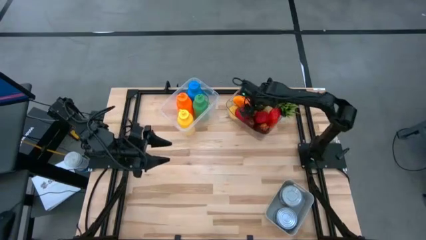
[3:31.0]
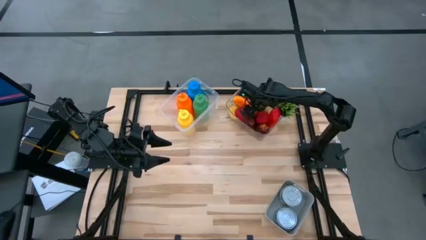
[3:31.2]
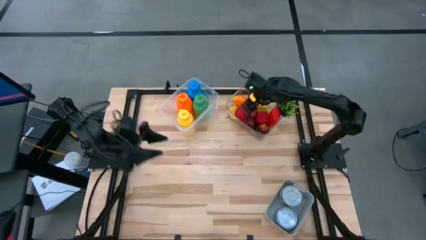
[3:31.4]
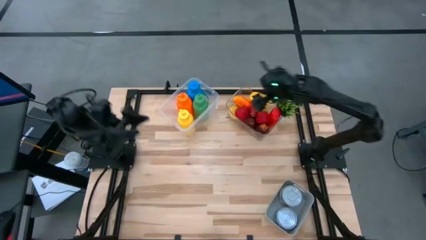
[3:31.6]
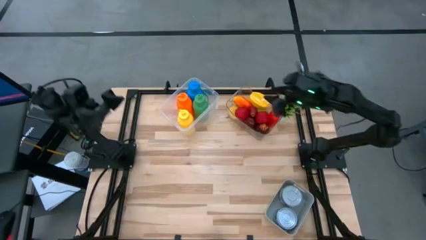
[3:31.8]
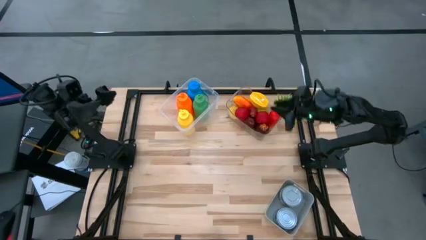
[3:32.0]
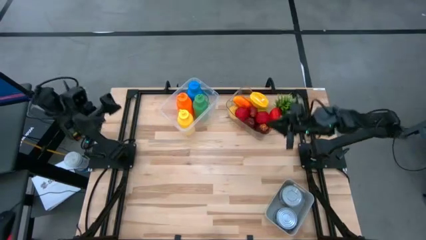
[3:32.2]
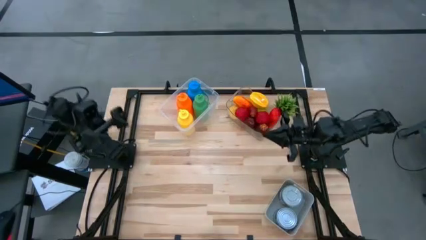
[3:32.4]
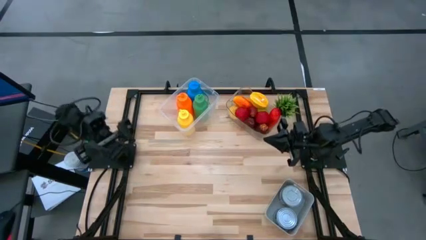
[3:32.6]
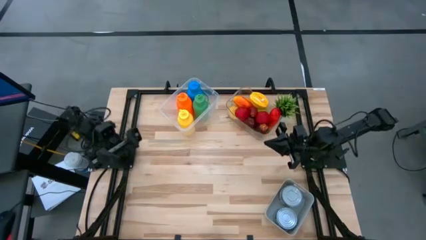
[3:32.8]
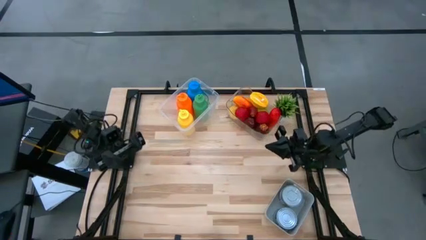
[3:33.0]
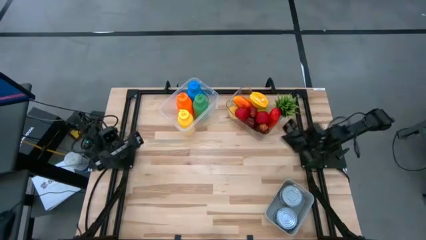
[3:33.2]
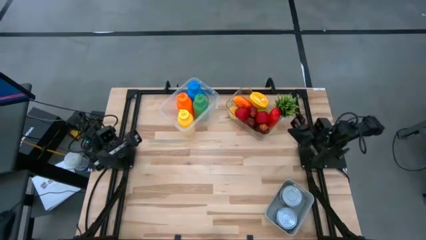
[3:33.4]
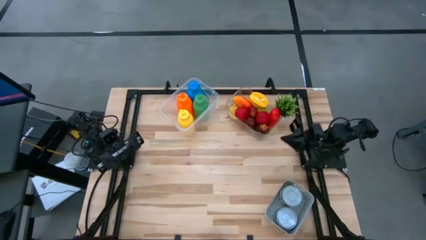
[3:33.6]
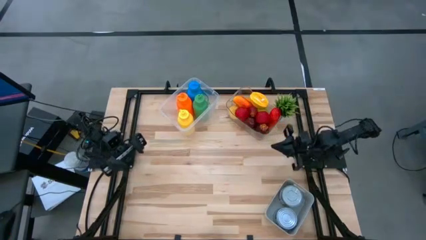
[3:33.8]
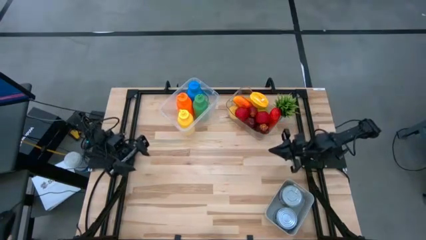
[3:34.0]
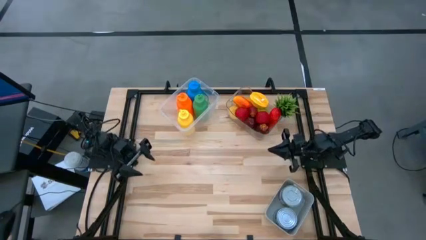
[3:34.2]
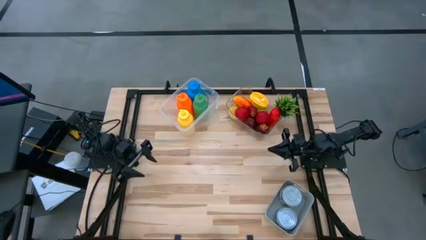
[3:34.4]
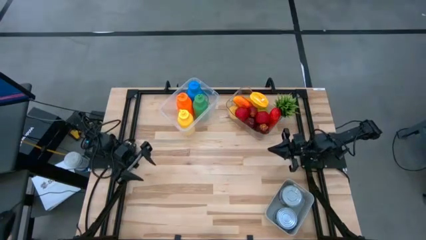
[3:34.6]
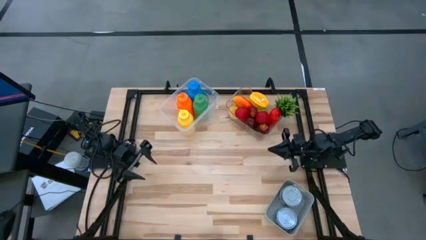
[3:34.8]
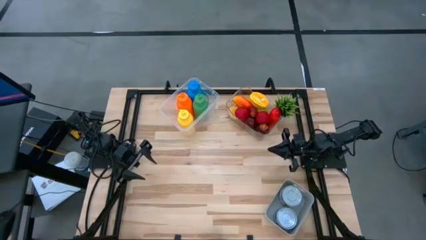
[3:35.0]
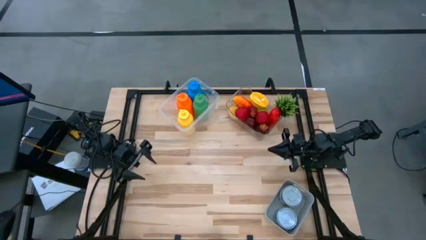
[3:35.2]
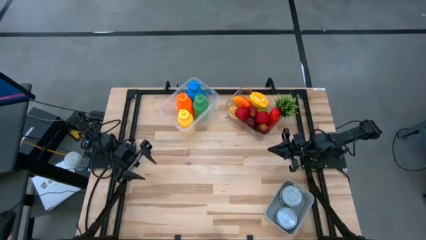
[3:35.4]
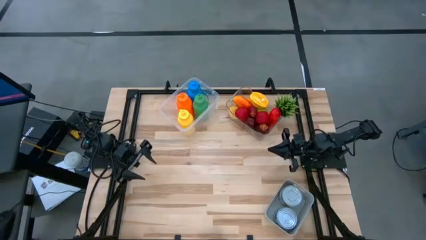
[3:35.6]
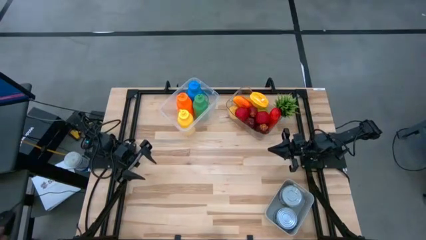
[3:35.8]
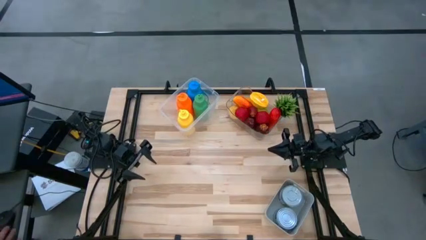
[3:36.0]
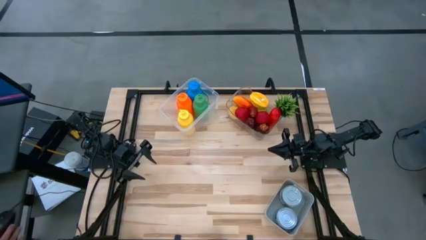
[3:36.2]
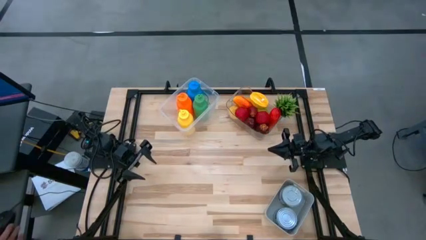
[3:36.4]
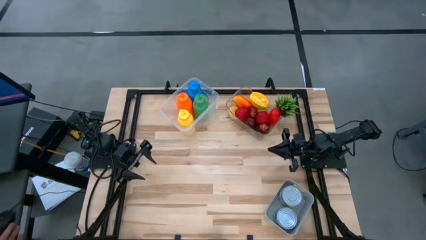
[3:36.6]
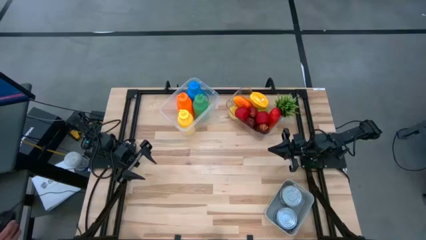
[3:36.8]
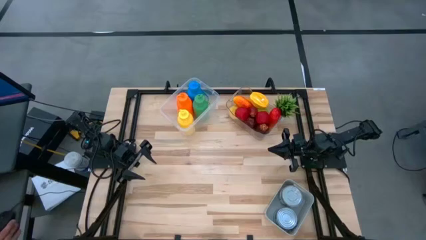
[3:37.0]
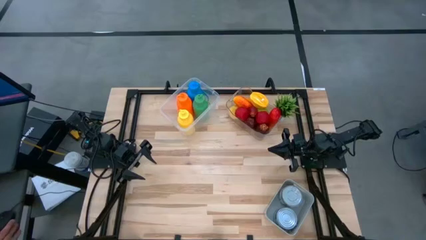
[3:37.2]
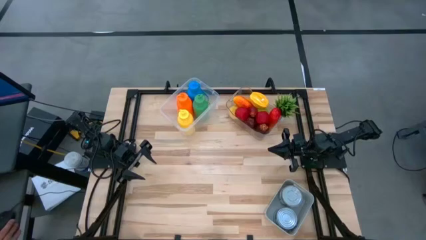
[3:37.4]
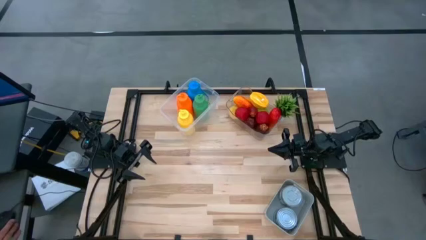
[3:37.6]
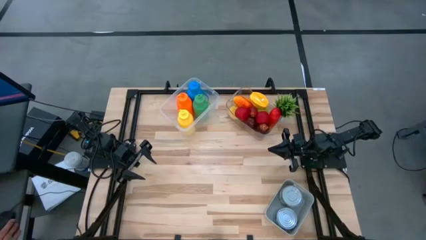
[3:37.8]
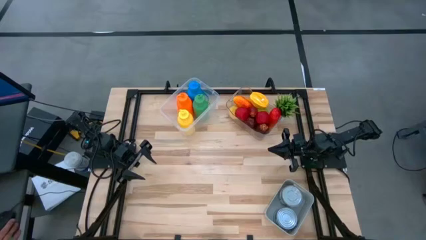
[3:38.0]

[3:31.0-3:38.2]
Task: Pick & Place Food Item
Return to Home Position

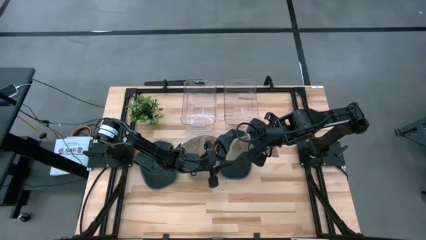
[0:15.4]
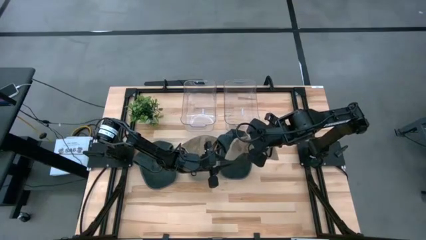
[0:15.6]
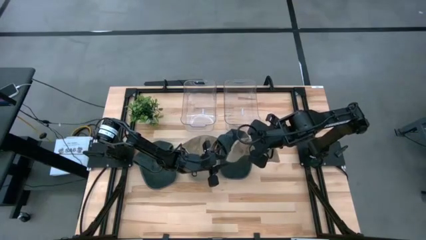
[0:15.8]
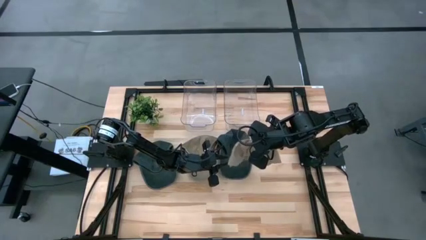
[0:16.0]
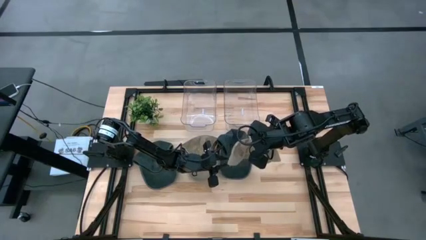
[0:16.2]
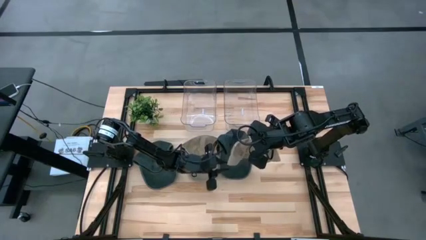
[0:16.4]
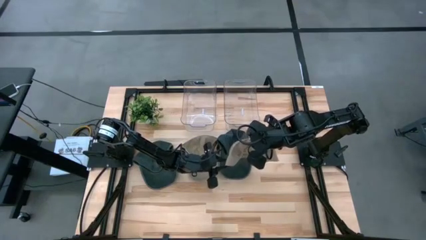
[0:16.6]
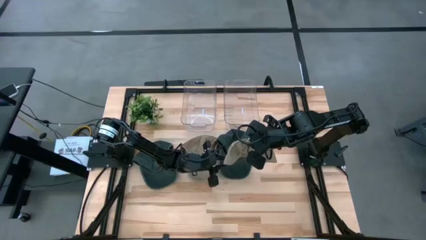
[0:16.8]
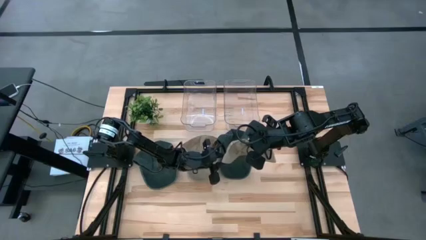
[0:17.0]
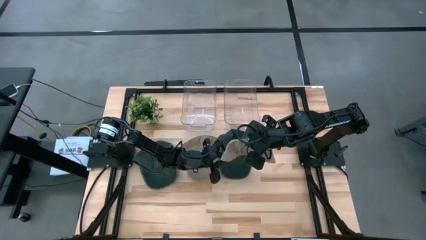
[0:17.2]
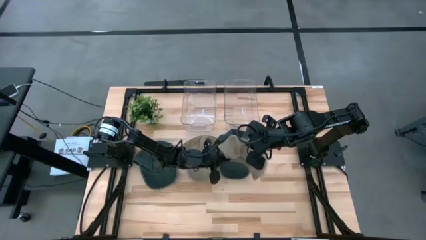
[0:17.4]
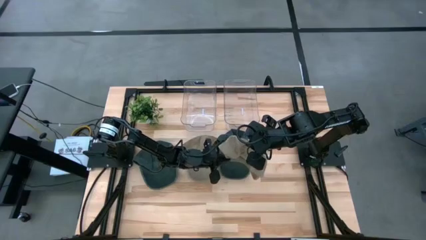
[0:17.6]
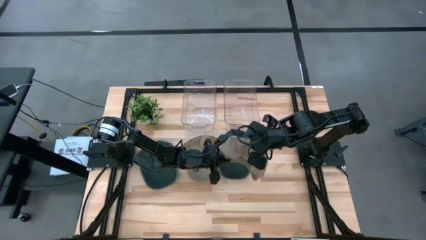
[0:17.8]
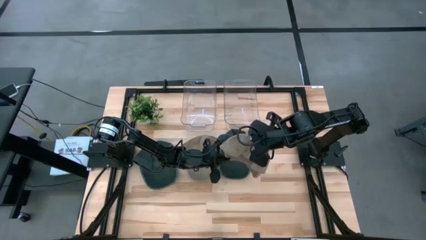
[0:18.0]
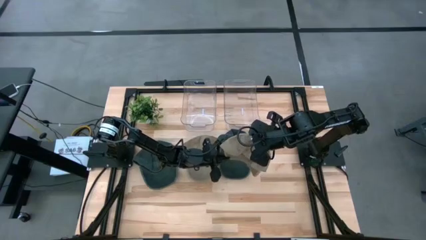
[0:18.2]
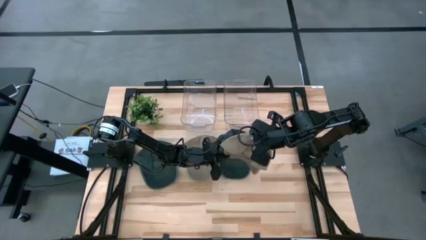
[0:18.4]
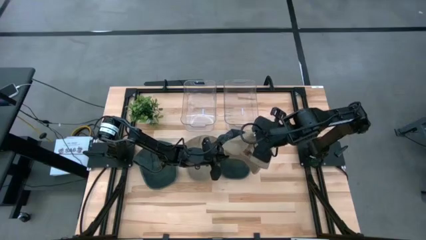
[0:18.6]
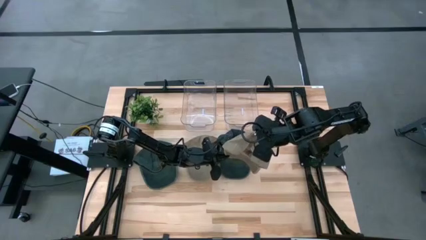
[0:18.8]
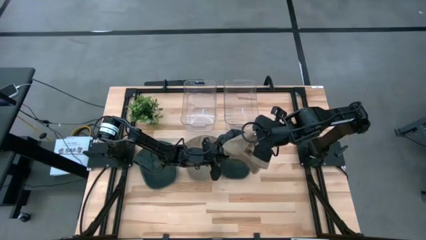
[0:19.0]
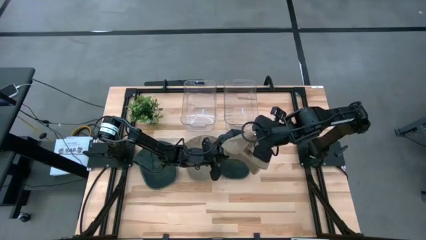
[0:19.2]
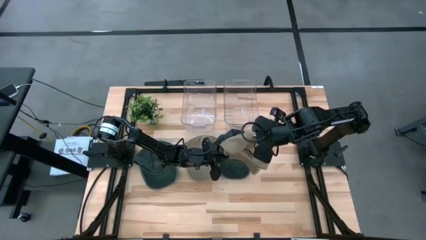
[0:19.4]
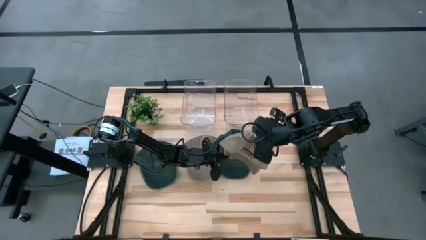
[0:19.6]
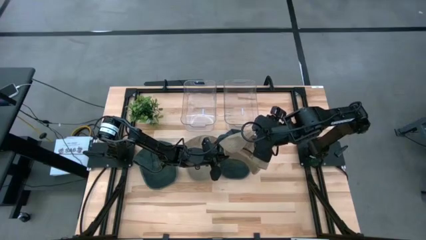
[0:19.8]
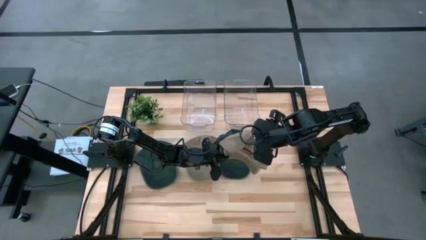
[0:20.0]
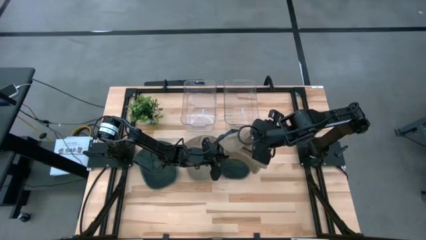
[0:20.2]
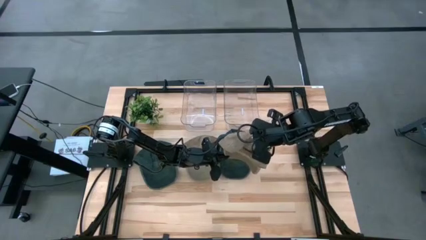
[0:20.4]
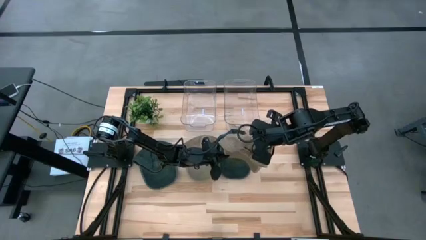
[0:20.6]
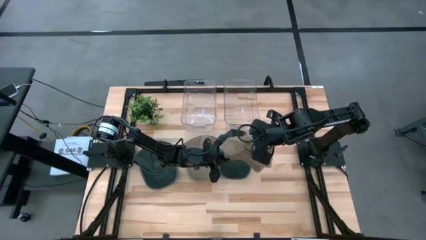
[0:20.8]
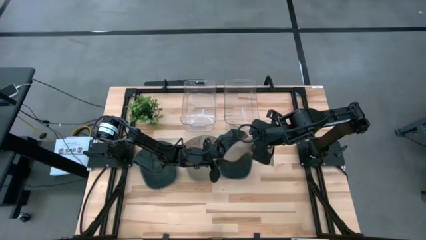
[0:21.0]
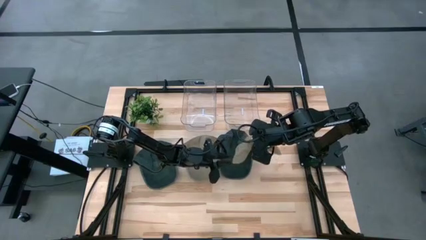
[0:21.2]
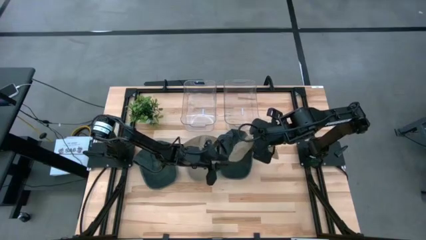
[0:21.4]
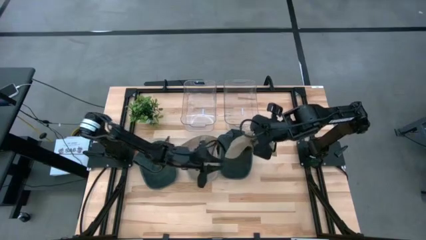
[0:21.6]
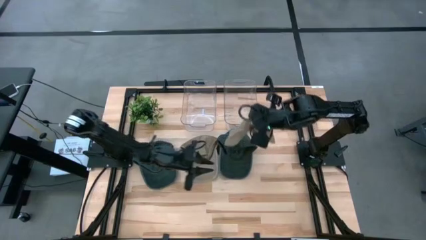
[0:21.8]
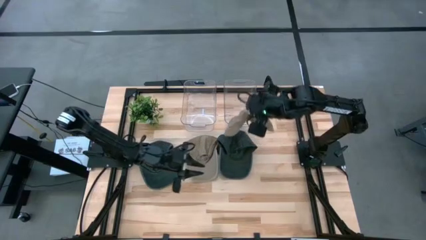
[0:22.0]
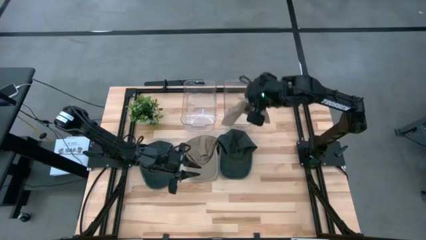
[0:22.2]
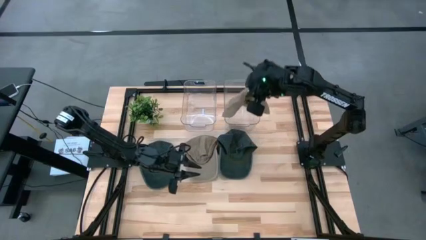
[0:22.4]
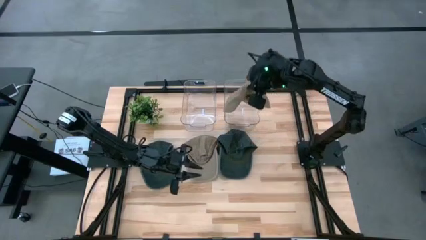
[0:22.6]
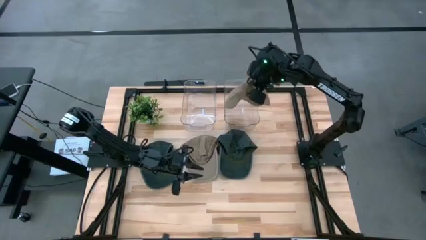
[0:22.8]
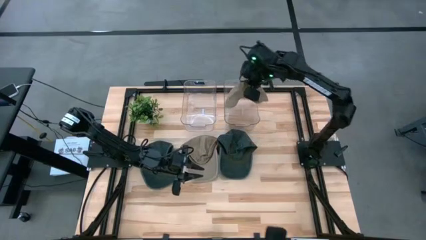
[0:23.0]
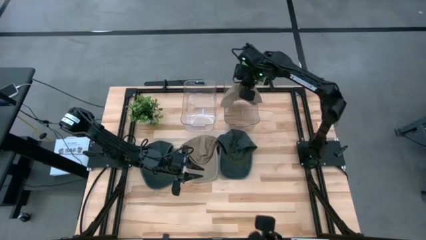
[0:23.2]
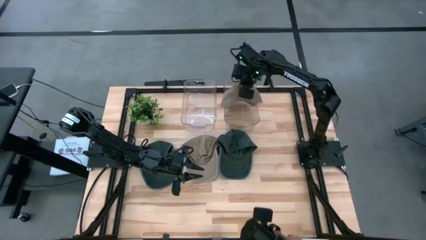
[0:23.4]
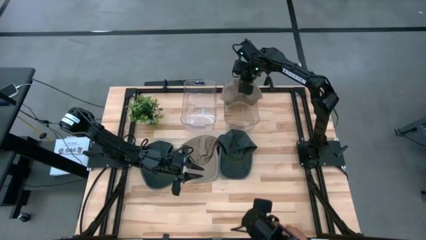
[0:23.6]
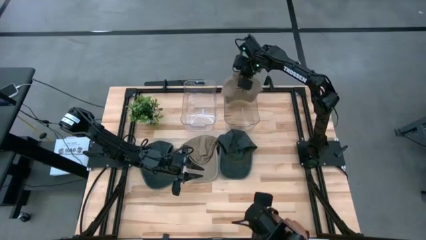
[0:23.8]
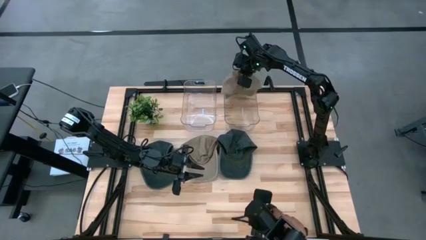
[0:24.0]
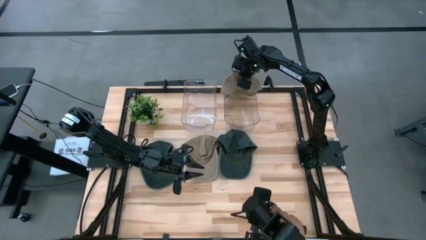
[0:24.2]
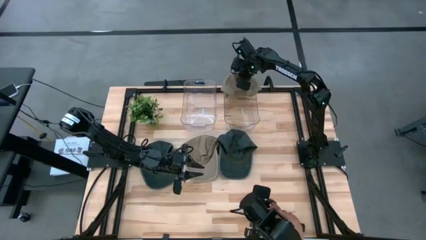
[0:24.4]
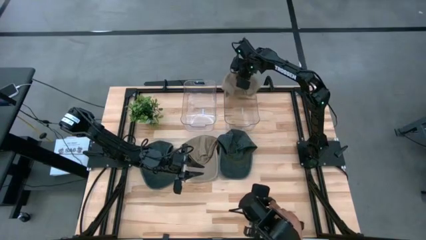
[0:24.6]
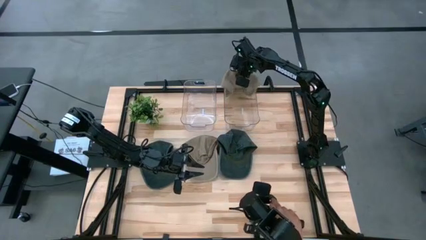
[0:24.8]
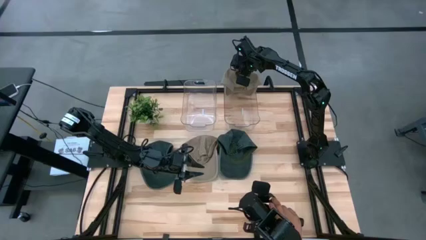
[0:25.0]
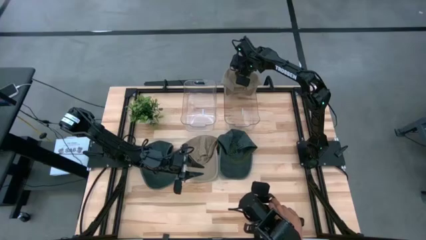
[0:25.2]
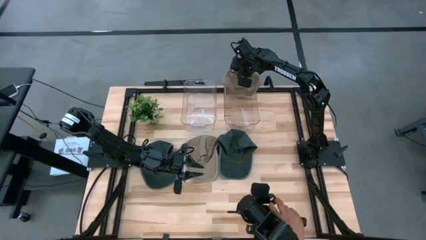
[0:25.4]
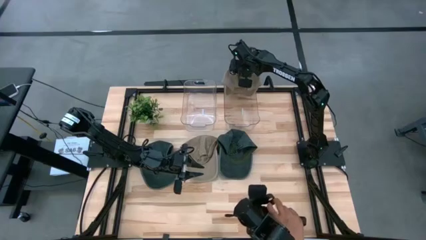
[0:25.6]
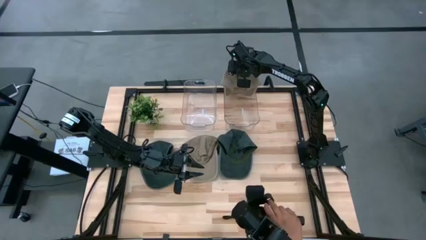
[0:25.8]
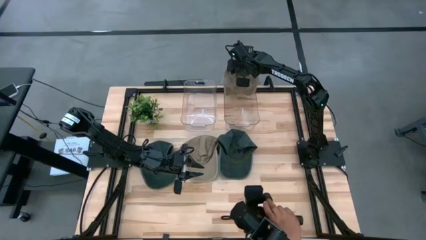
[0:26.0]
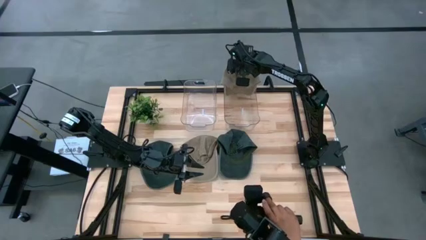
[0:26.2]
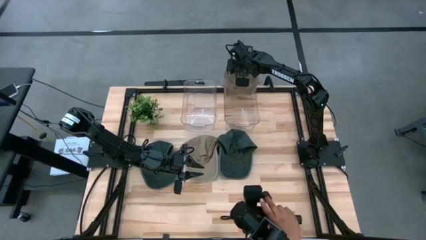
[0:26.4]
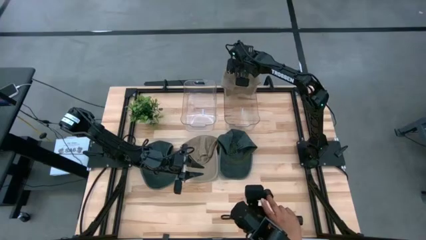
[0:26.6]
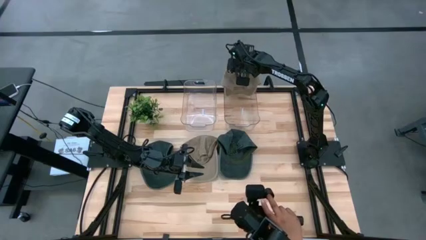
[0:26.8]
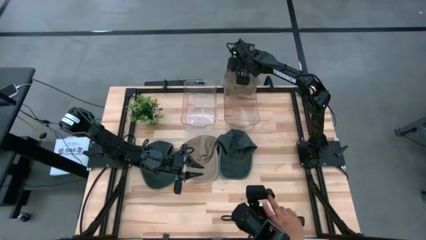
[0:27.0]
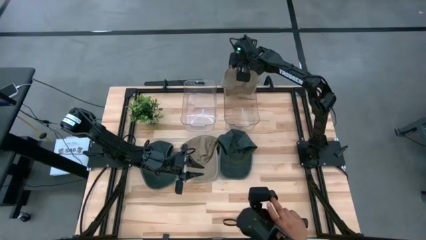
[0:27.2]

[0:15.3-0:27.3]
Task: Pick & Place hat
Put the right brown cap into the right transparent bin
